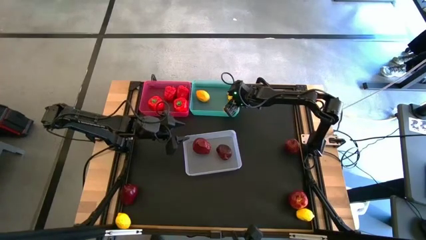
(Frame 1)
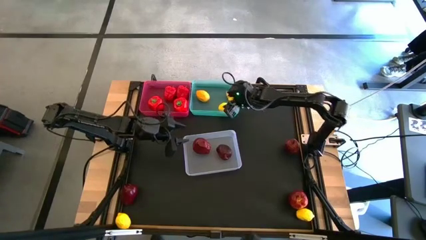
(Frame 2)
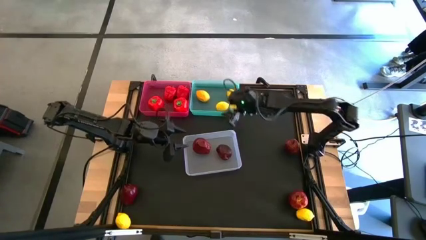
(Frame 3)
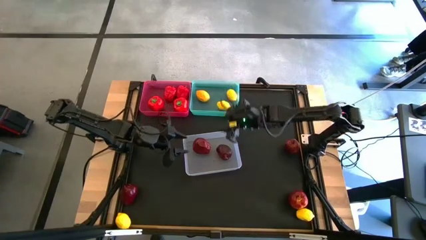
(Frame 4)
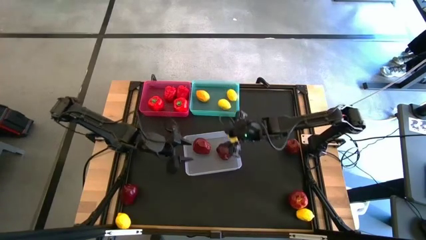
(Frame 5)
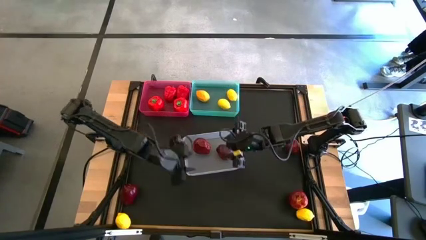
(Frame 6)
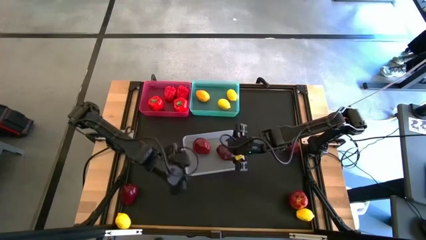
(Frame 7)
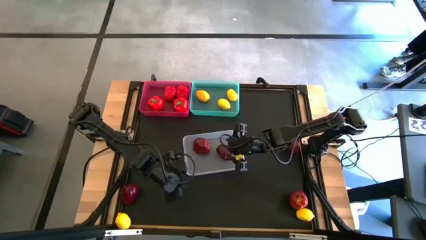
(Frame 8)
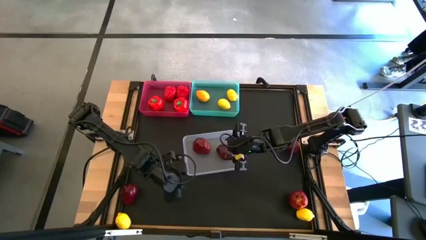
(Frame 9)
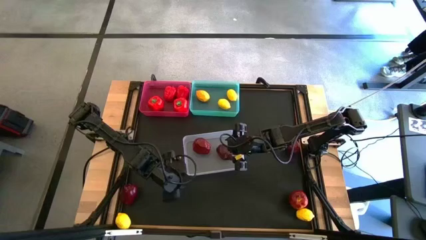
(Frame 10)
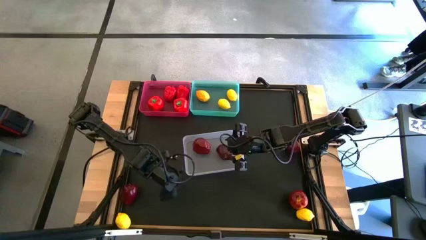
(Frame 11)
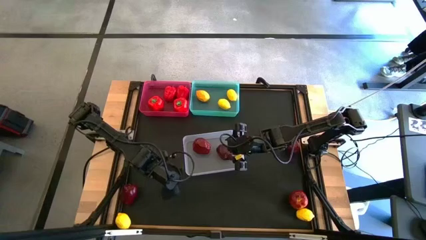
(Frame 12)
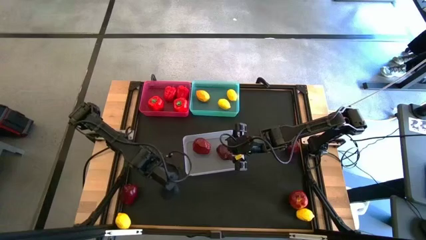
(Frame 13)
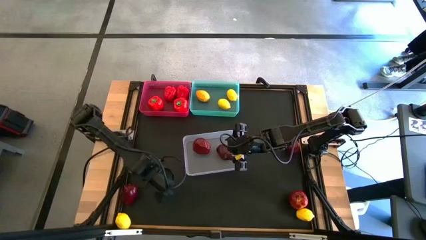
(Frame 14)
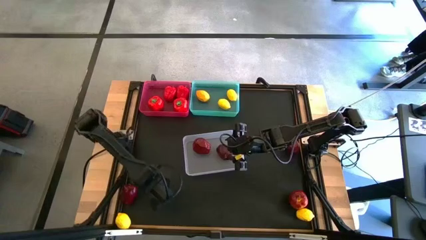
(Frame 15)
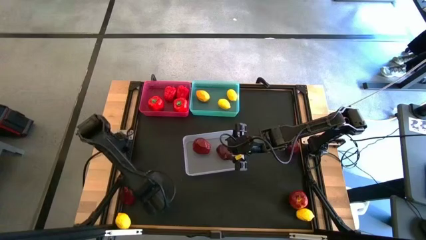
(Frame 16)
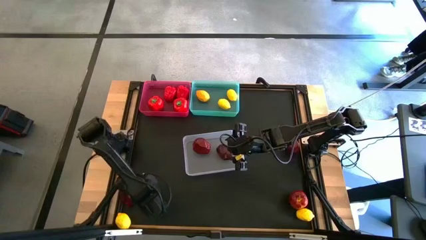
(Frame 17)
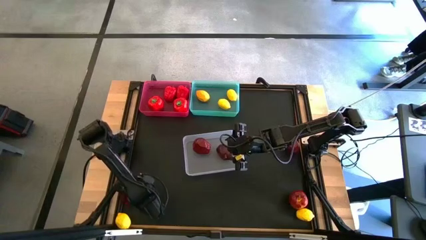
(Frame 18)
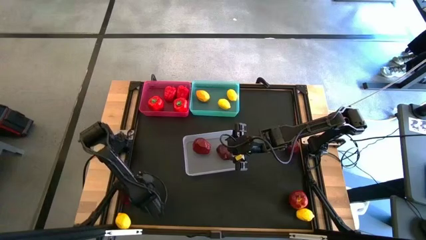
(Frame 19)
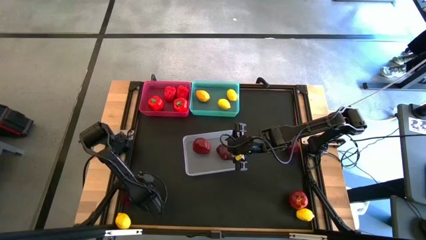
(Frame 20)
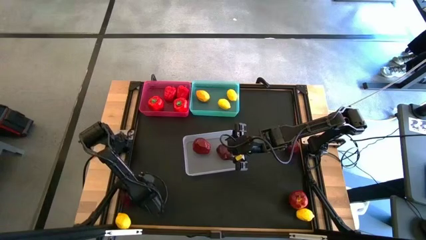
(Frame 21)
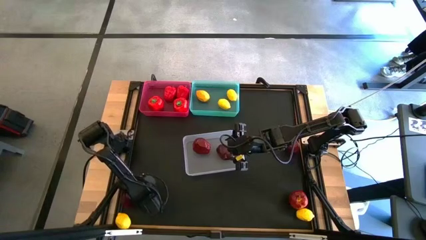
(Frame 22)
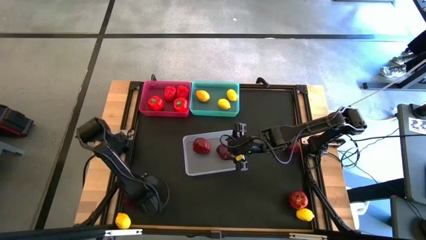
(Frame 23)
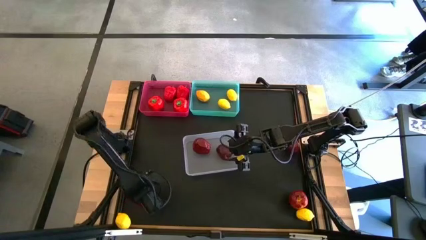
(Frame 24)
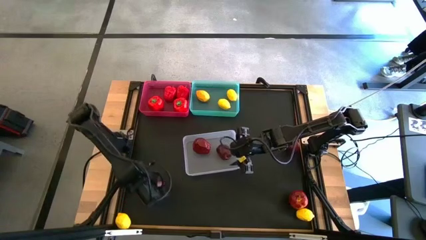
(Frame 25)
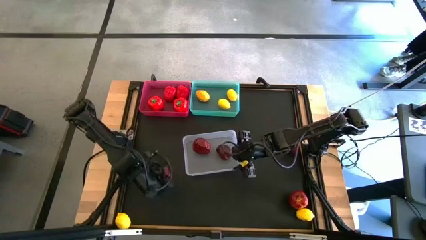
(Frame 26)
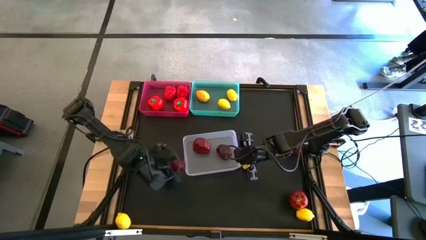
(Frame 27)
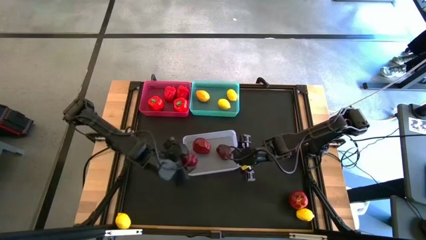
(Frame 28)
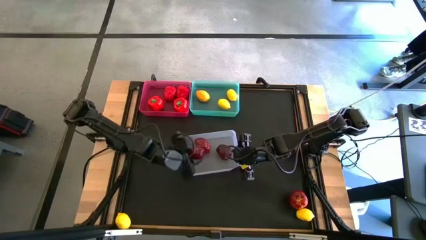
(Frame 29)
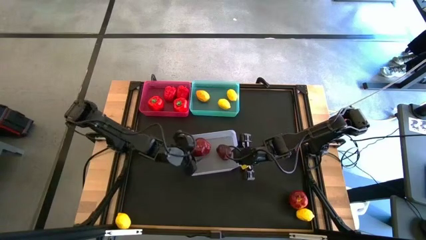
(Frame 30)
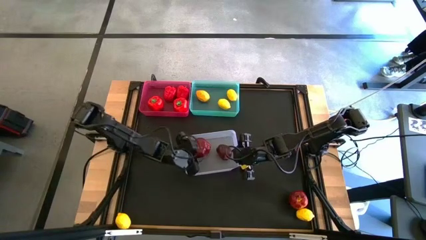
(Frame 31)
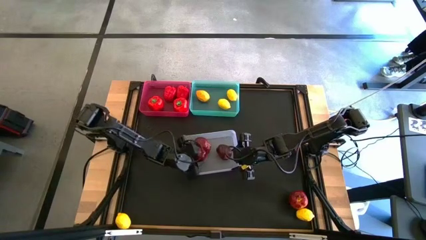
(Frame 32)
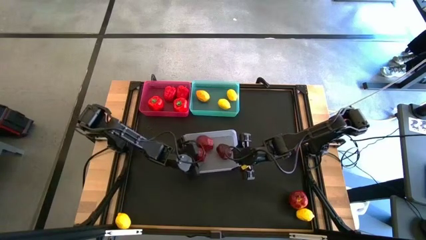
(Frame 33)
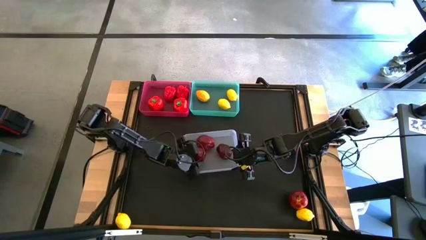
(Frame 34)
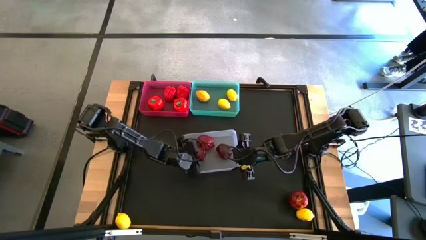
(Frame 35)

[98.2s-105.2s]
Task: Sort produce into baskets
Put the dark red apple into the transparent bin

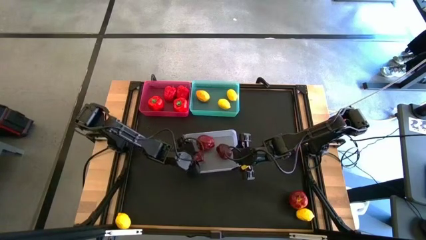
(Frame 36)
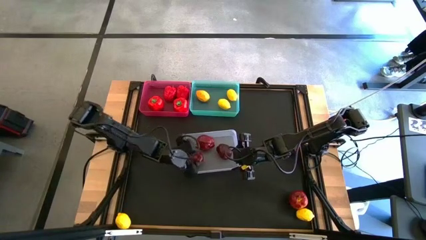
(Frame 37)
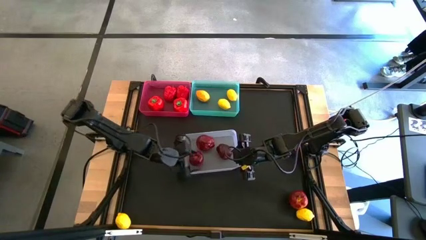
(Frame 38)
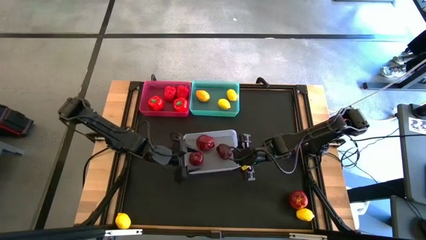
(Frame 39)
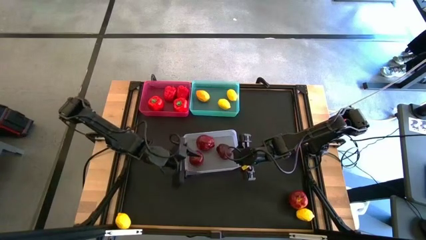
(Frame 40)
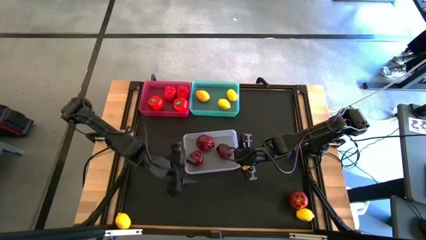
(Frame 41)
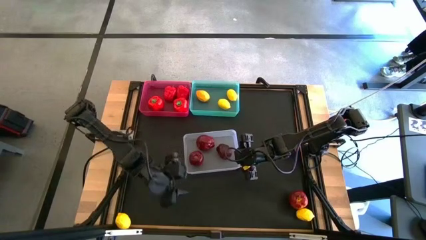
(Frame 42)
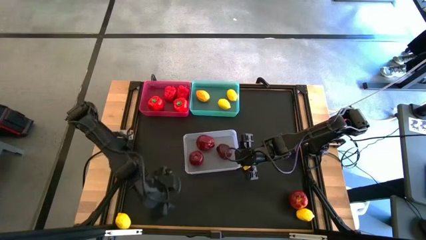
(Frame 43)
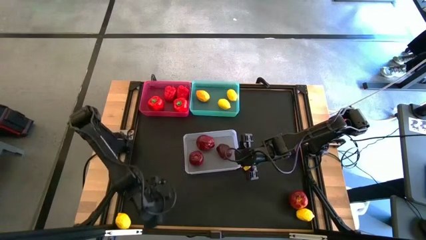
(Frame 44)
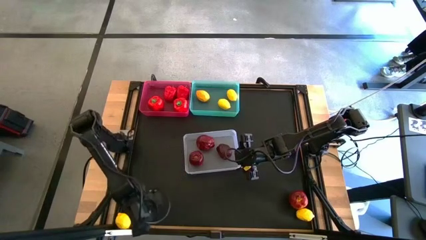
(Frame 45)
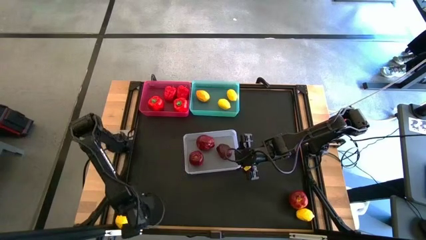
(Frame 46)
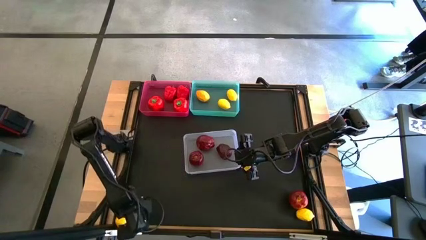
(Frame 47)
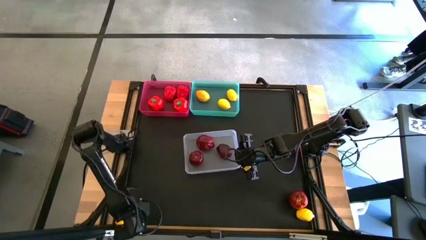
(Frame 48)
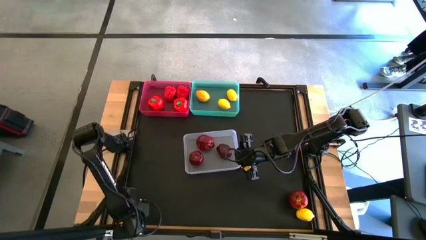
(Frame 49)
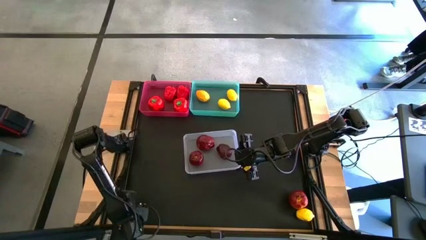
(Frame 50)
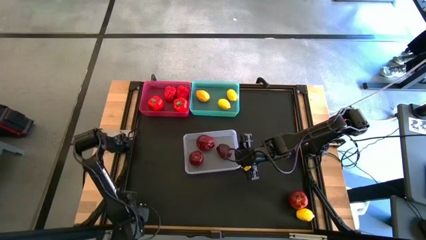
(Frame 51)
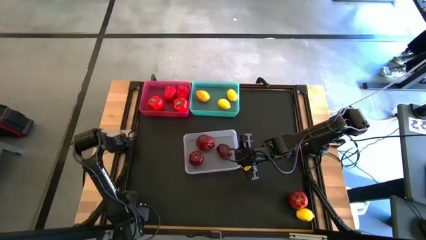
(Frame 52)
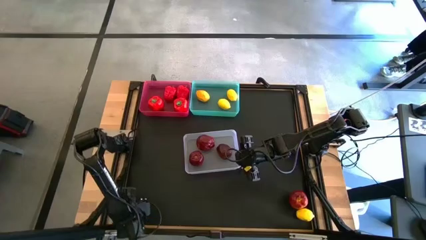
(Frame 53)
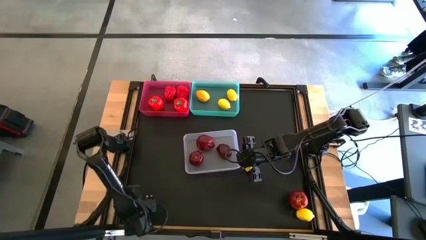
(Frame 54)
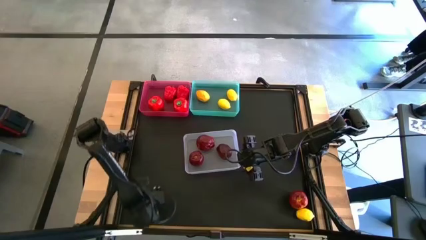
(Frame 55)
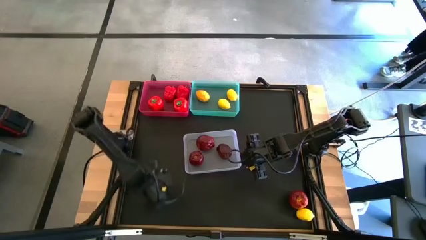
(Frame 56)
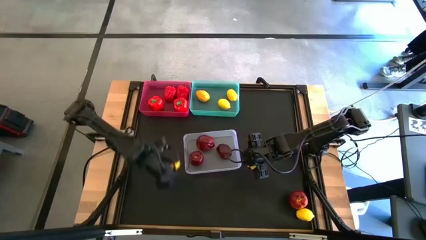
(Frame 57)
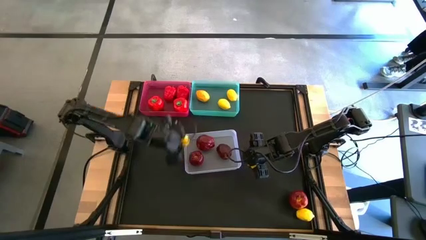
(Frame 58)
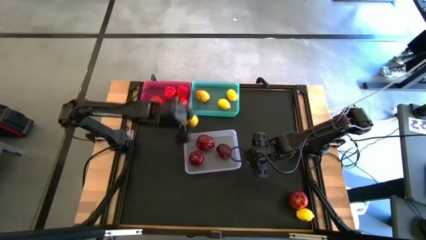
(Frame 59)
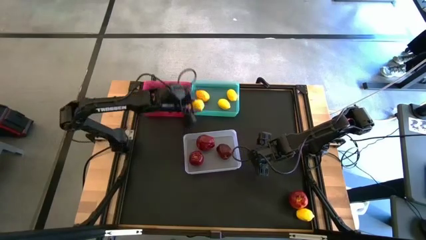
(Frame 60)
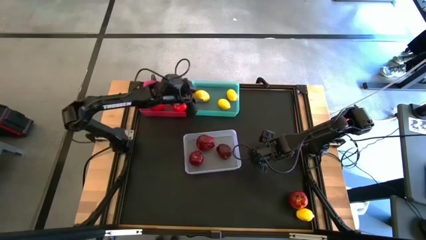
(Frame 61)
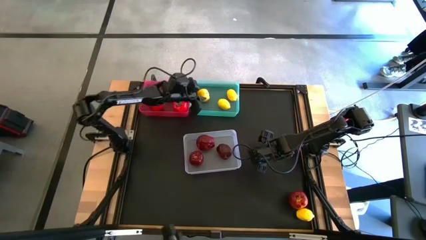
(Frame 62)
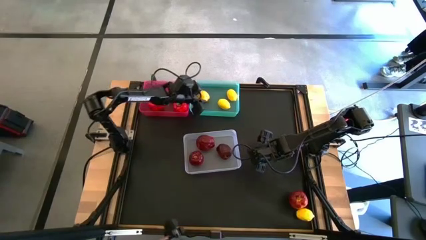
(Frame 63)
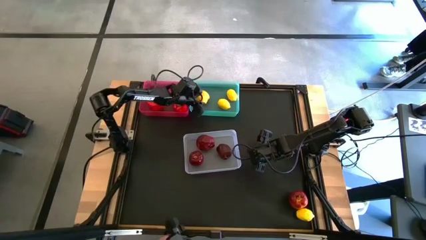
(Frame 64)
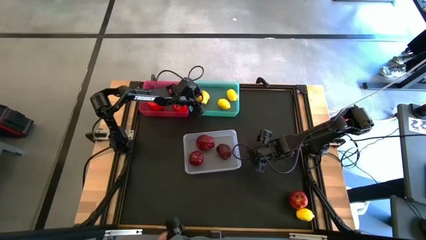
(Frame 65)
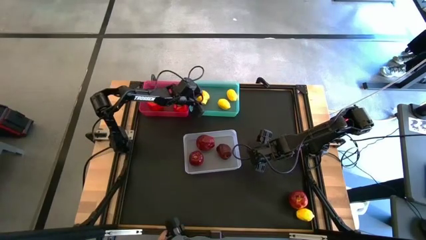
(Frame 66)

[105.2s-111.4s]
Put the yellow lemon into the blue bin

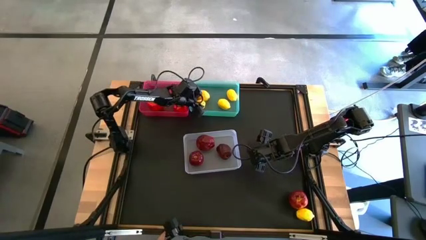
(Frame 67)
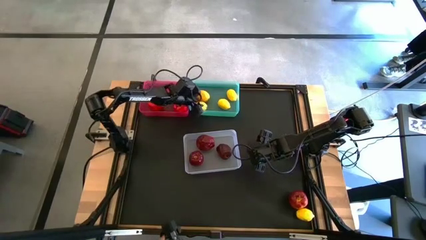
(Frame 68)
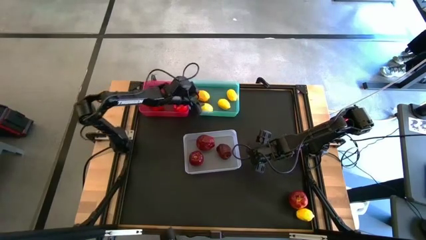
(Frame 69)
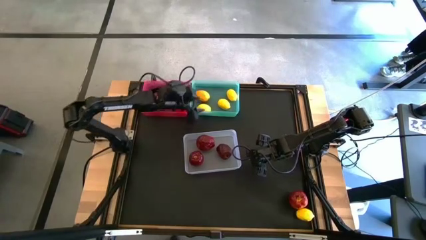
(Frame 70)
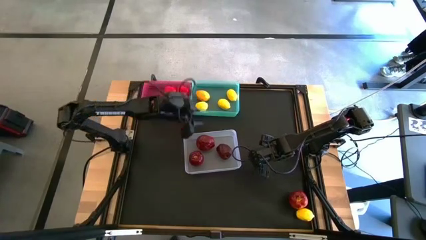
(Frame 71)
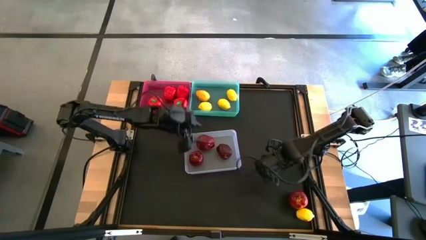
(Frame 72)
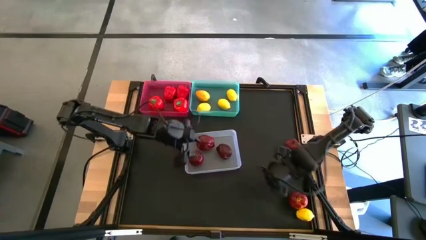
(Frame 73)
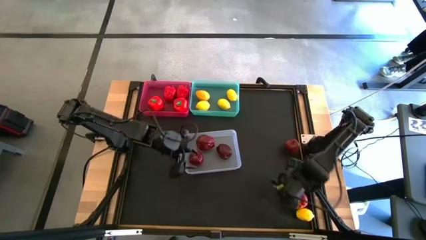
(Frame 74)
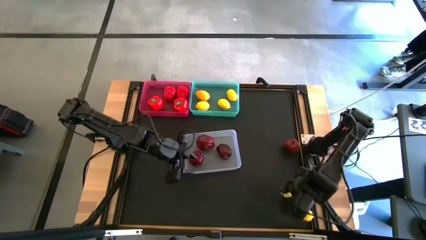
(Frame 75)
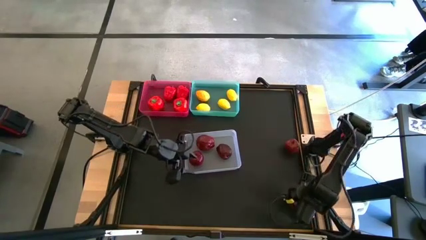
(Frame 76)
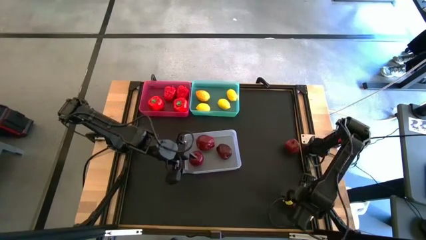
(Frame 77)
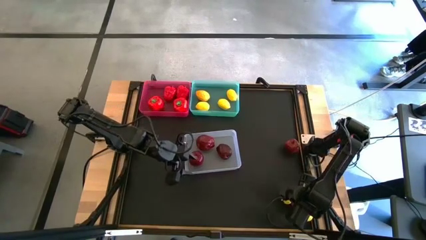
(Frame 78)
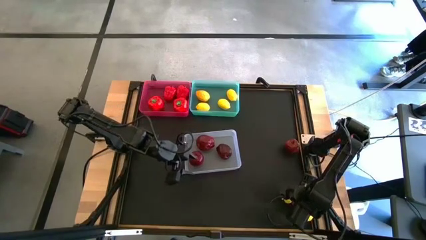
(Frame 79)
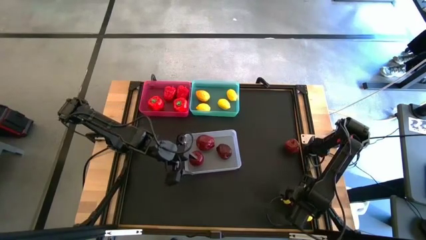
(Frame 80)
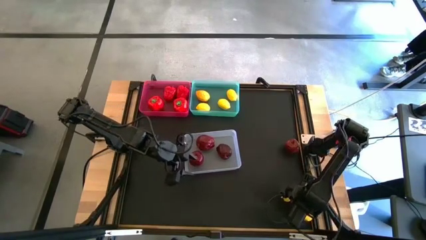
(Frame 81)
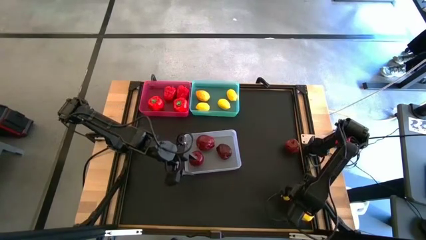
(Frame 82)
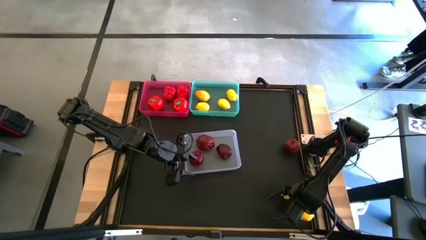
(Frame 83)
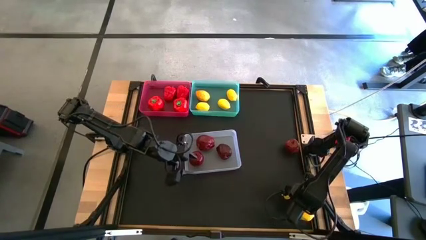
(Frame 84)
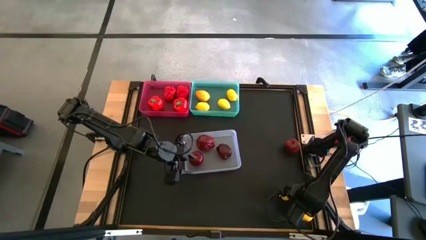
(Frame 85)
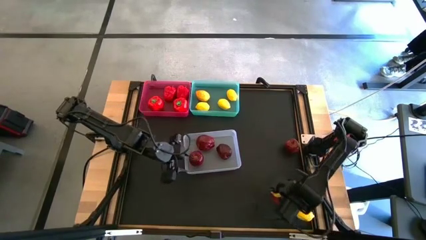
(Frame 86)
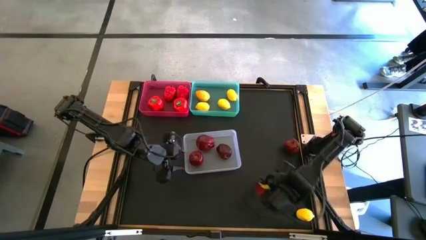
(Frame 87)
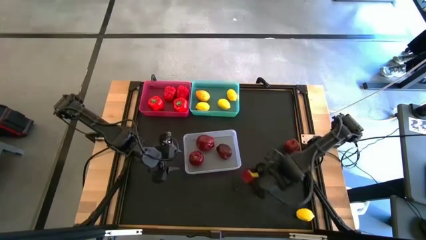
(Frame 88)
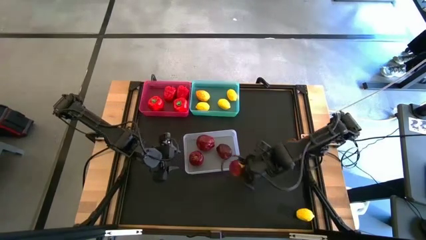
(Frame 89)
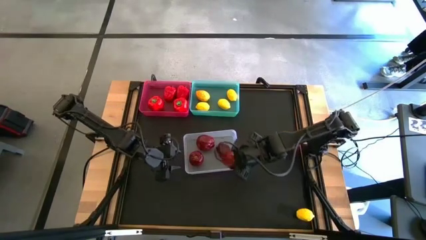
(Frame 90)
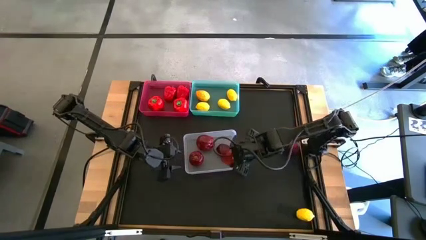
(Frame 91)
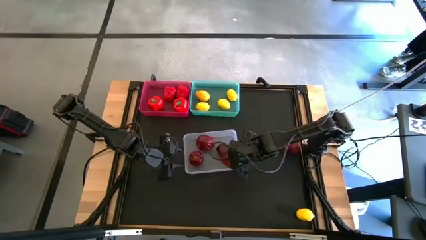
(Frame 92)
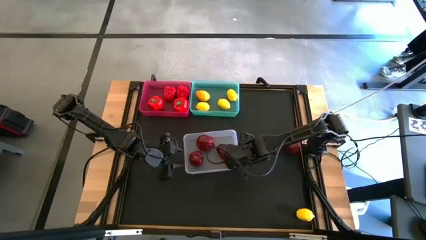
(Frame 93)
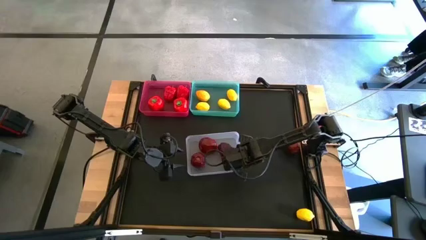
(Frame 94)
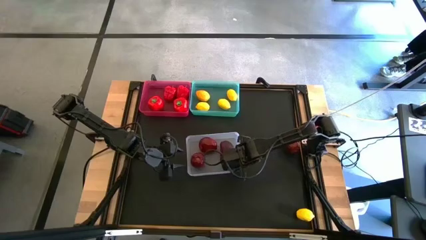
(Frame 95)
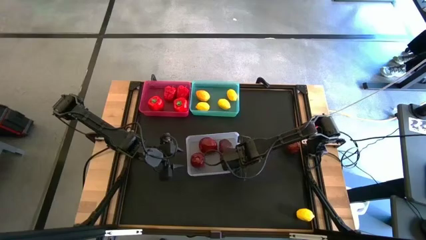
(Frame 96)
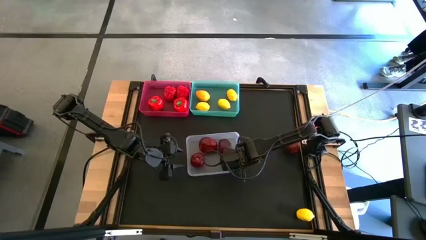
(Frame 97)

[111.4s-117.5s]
Put the dark red apple into the transparent bin
